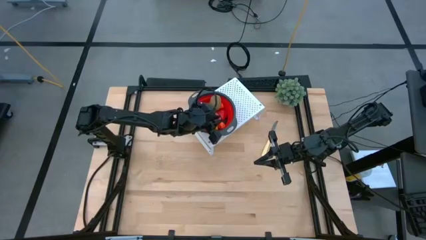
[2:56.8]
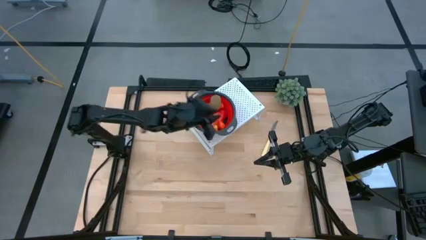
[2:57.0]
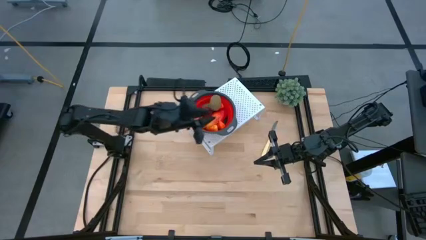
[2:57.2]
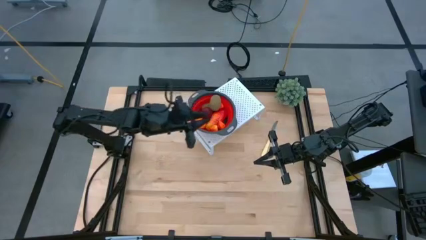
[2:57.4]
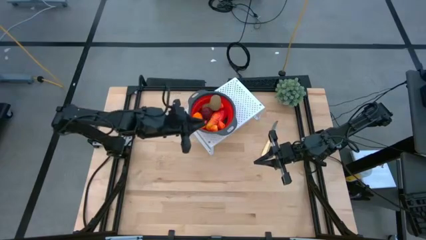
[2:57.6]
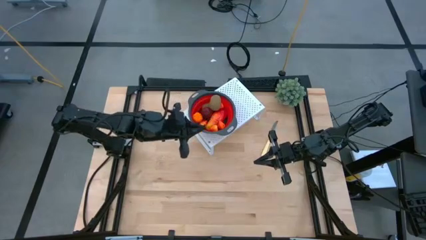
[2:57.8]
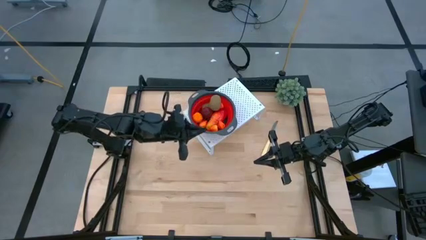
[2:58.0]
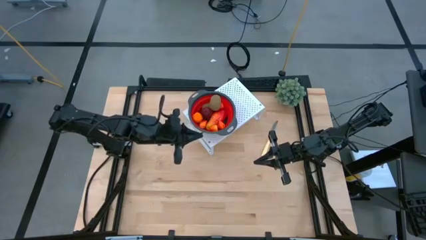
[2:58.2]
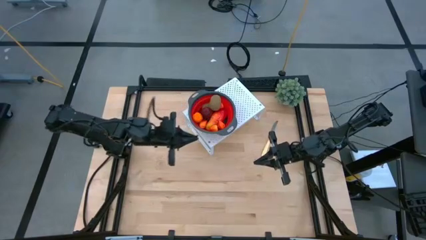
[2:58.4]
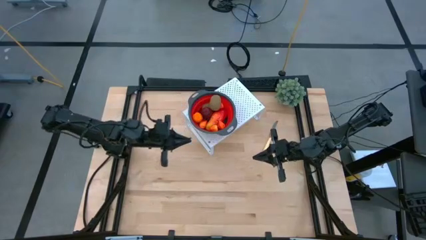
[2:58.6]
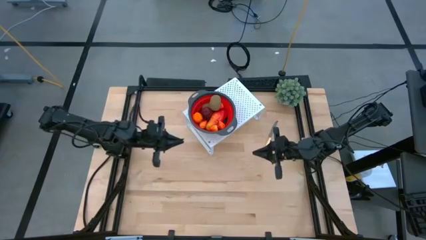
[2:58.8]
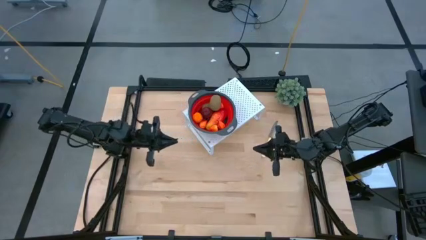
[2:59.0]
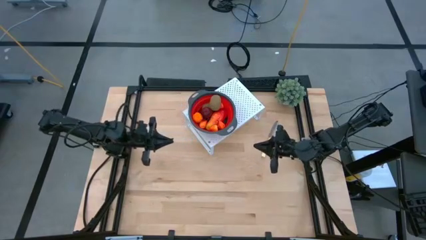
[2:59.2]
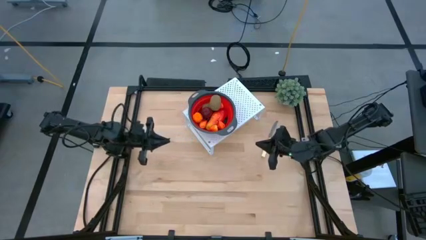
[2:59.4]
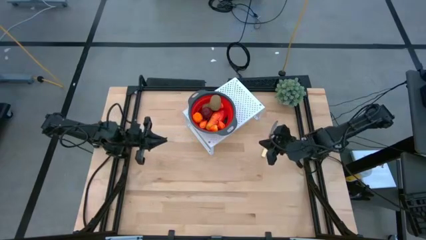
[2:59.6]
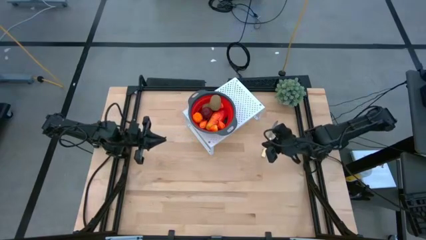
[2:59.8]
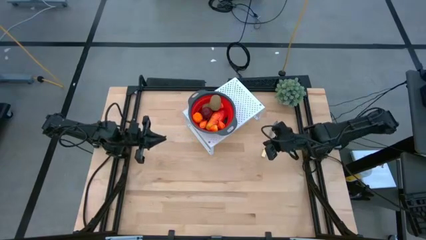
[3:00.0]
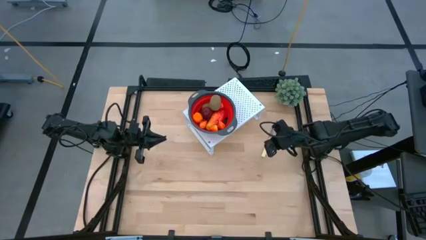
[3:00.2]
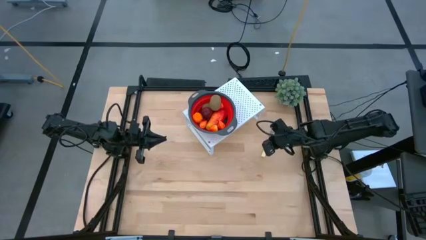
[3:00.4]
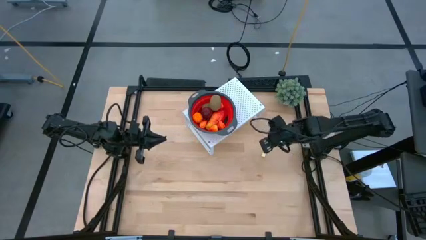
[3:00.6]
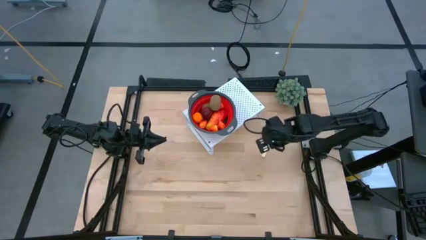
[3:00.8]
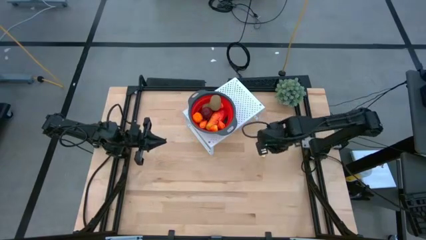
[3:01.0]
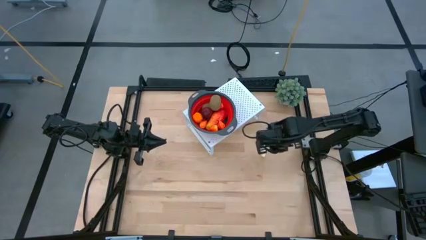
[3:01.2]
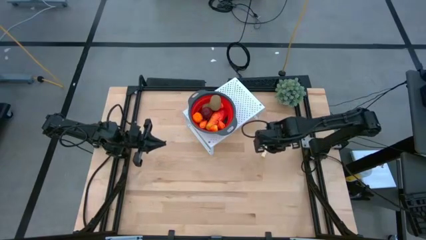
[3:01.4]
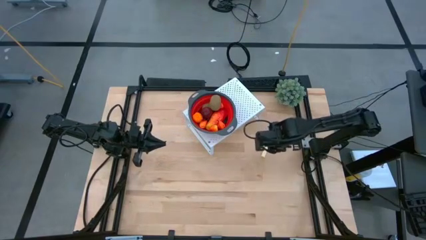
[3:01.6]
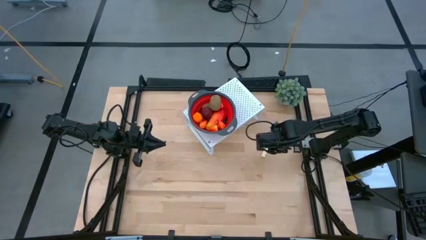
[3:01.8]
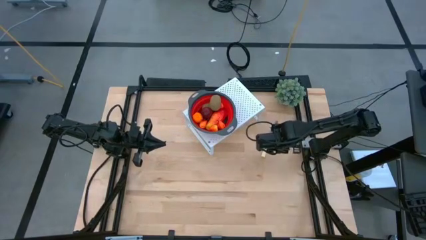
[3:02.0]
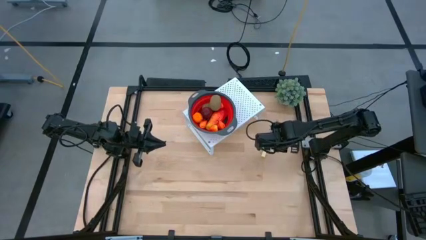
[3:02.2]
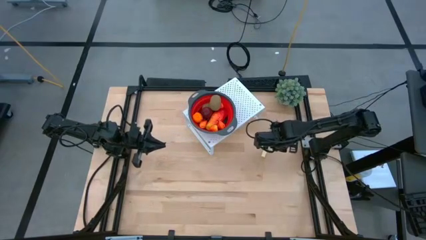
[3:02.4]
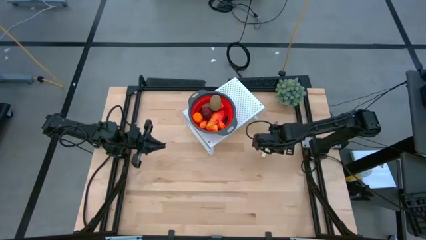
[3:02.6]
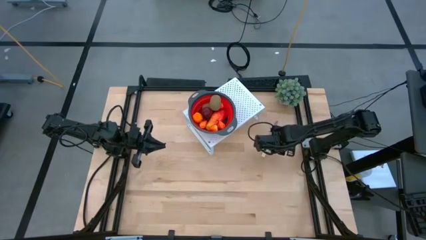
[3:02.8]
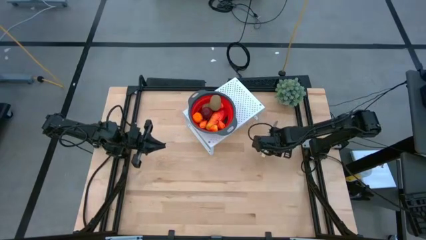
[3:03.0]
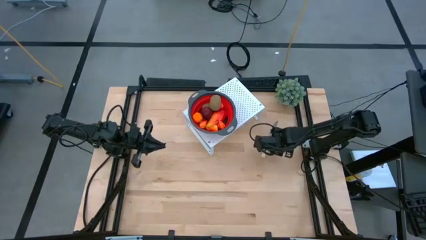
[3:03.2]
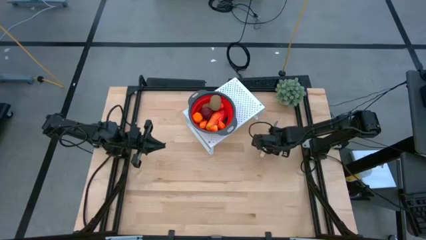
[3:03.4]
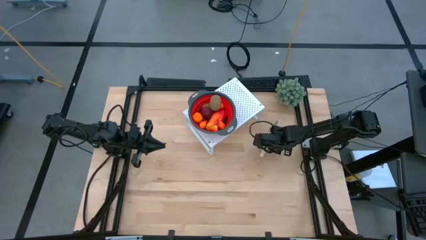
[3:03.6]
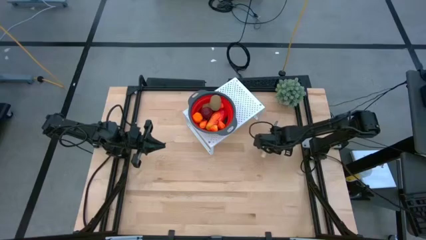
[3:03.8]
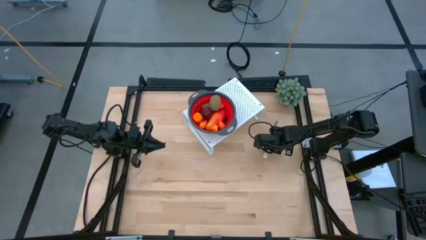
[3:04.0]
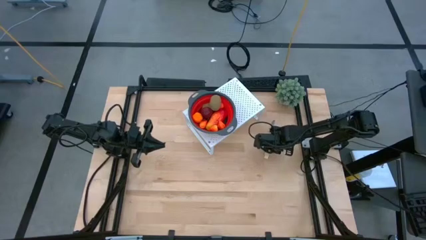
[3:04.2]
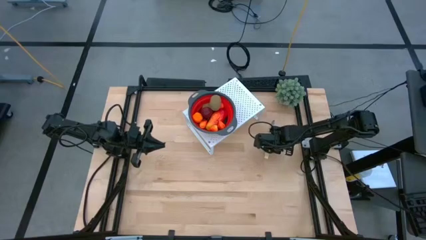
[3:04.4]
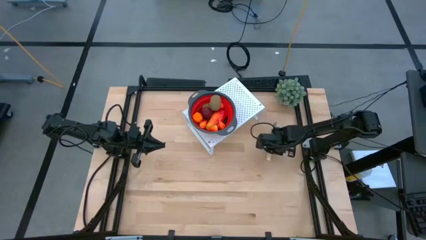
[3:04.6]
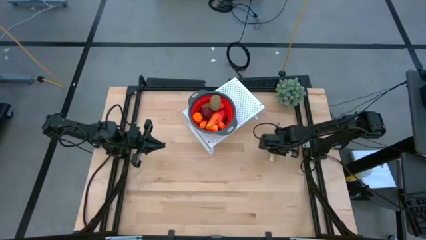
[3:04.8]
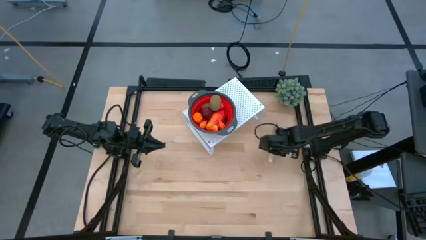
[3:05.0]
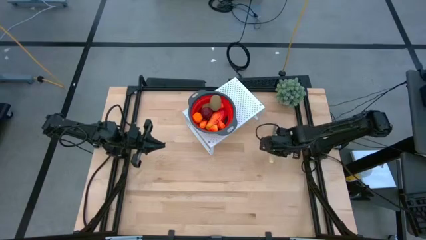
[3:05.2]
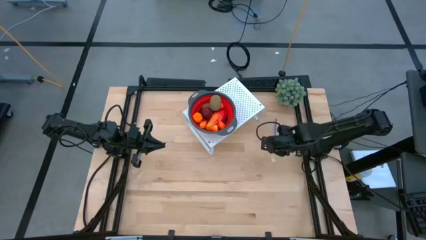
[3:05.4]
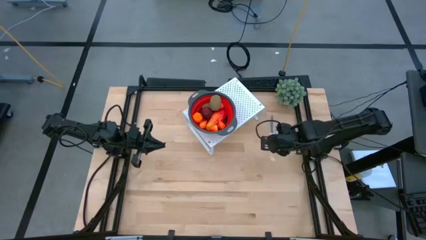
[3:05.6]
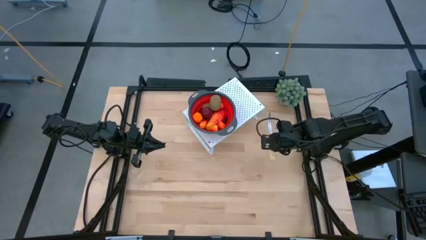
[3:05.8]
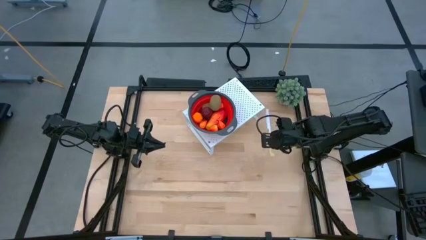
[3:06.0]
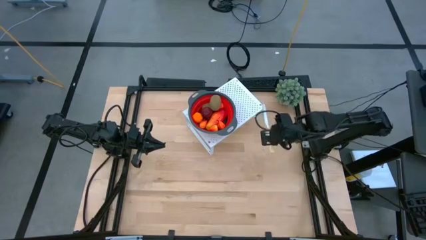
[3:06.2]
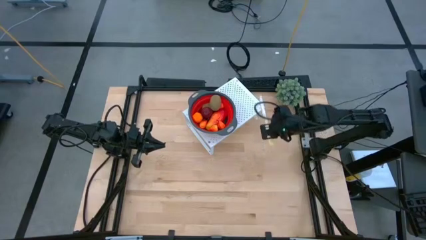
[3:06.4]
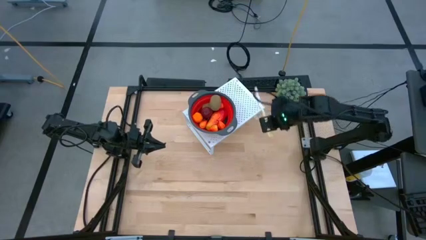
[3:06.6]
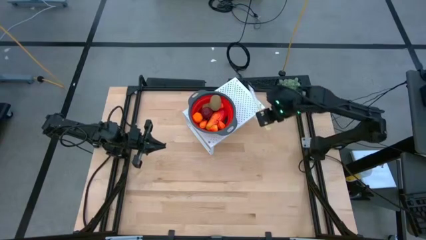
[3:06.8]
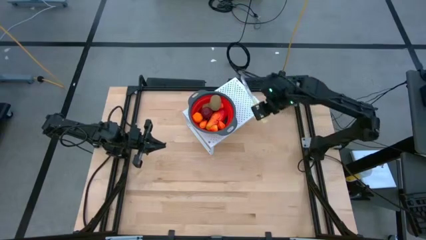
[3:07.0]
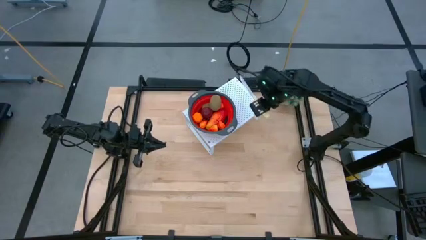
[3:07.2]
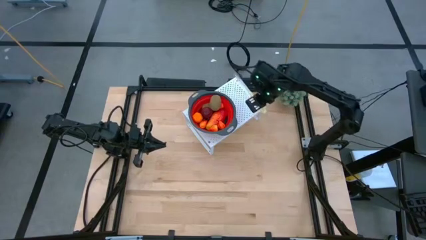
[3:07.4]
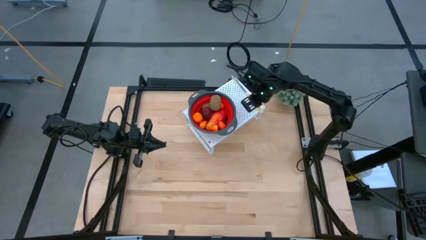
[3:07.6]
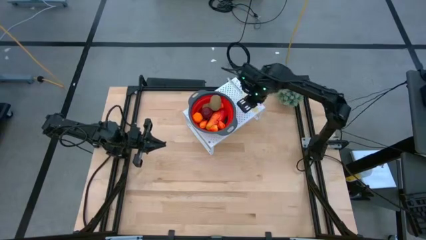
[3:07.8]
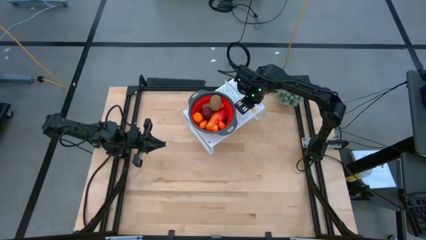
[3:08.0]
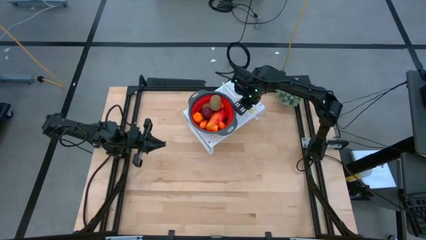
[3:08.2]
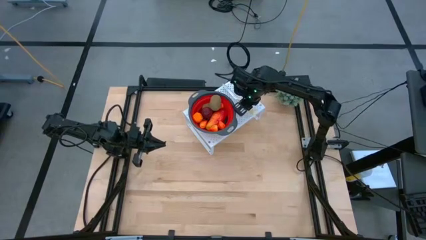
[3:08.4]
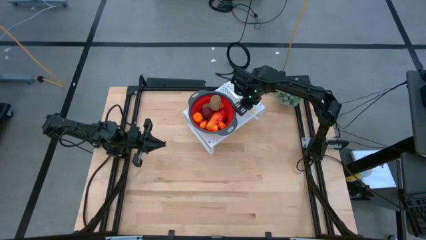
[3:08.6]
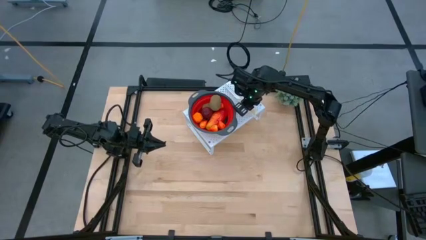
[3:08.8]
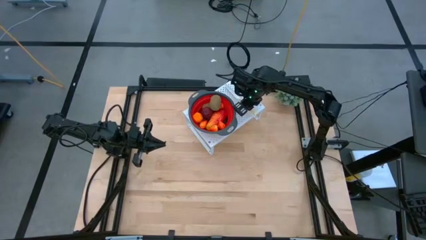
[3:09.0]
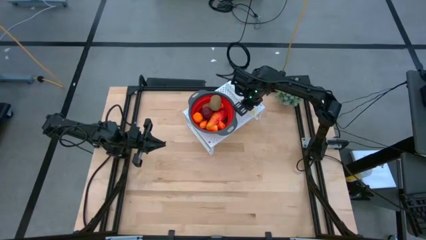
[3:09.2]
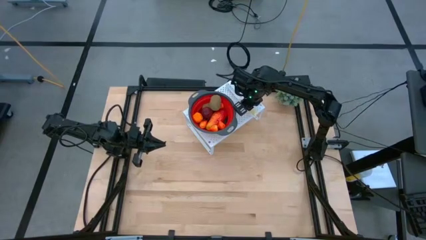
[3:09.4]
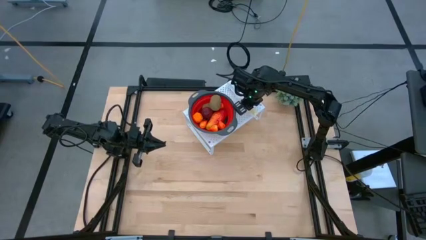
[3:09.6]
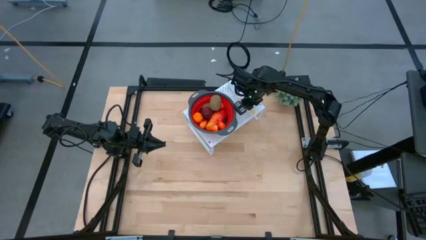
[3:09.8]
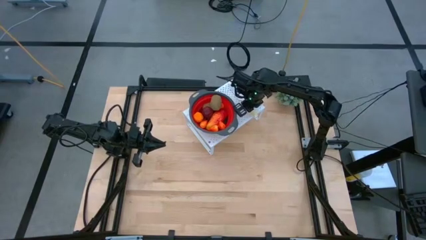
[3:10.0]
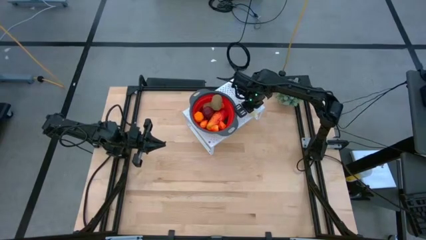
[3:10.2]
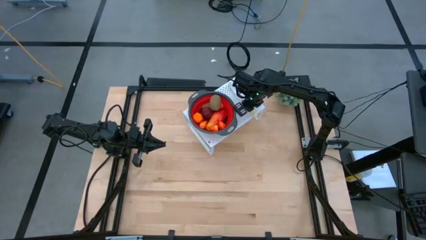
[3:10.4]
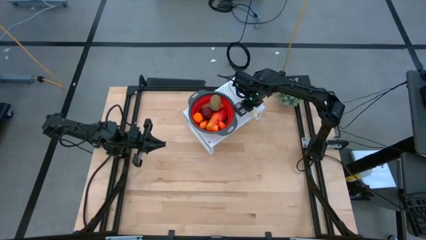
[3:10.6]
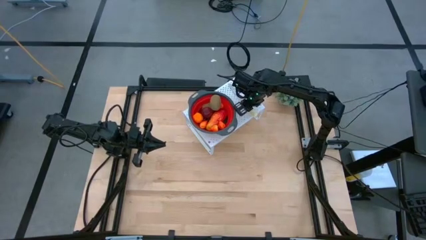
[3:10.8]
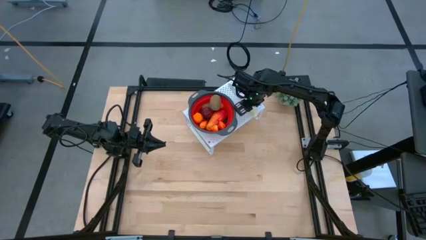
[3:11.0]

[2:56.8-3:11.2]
Task: Pick & Place Fruit
Put the table knife on the shelf
